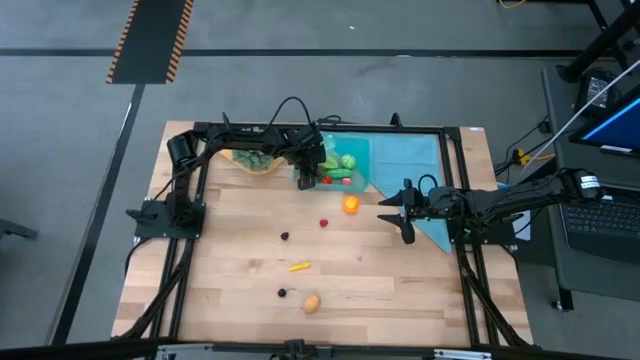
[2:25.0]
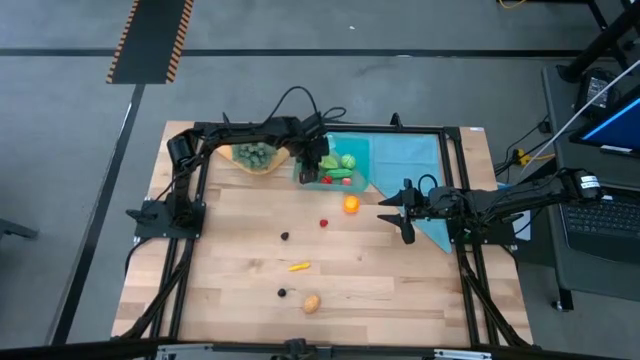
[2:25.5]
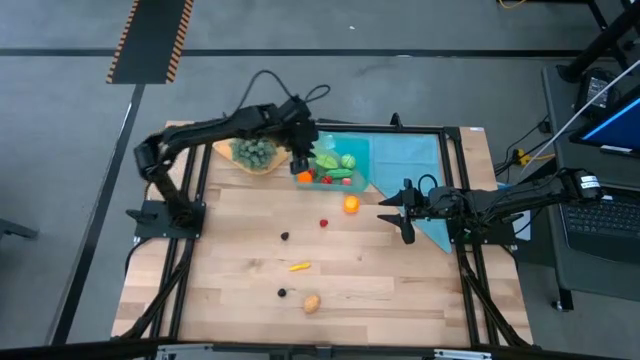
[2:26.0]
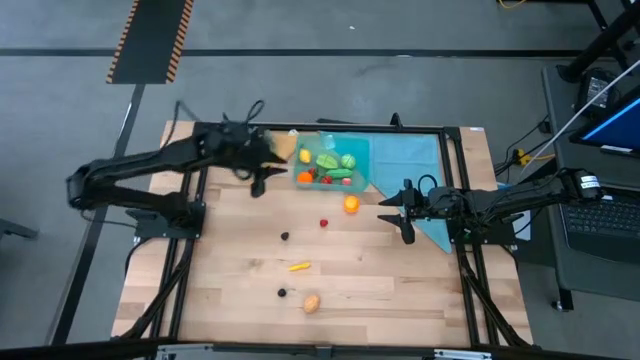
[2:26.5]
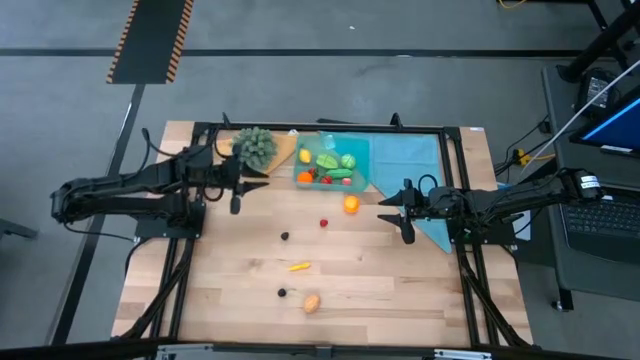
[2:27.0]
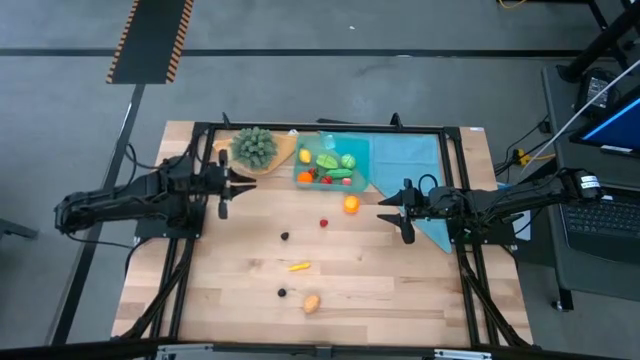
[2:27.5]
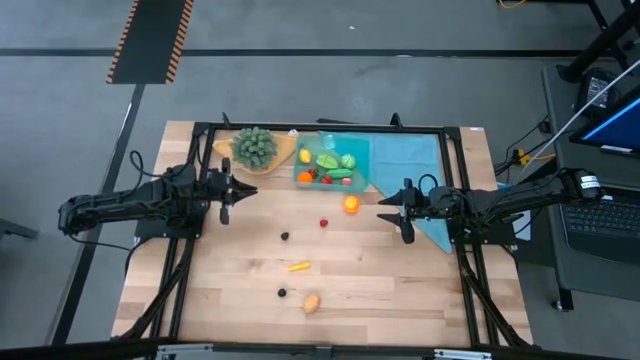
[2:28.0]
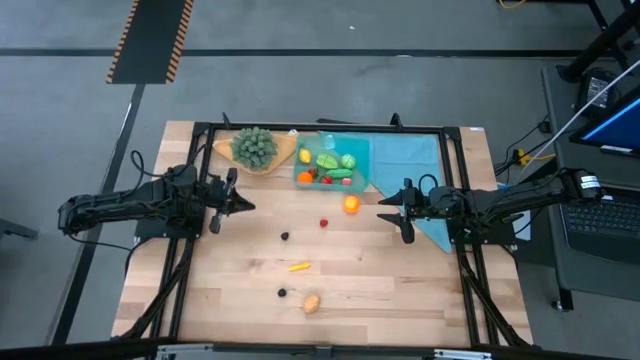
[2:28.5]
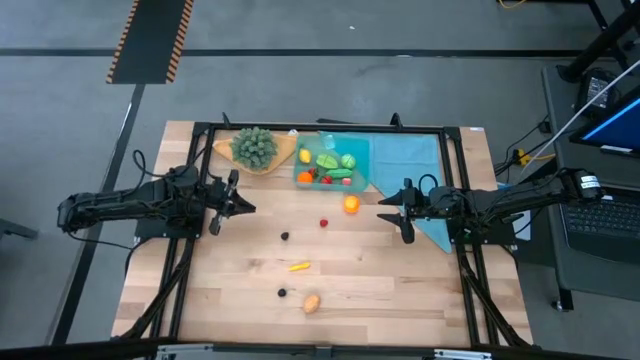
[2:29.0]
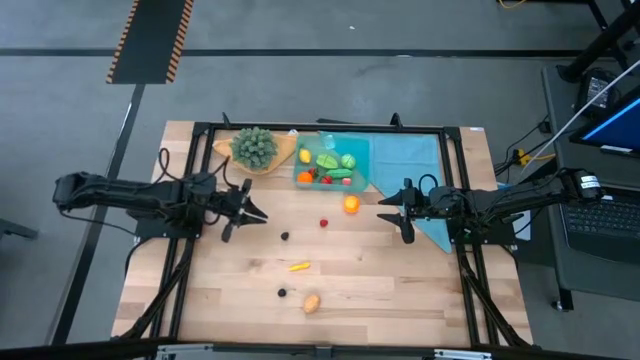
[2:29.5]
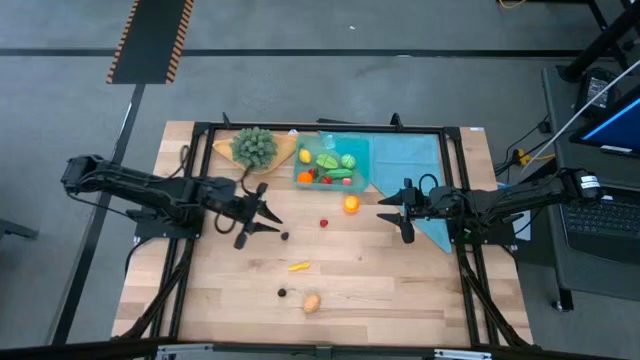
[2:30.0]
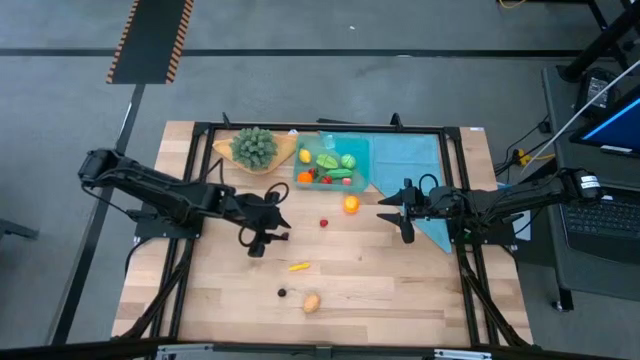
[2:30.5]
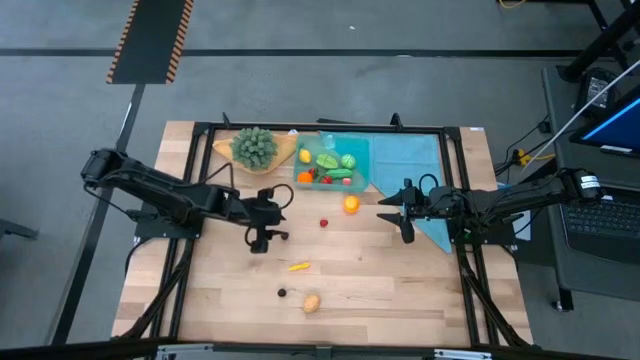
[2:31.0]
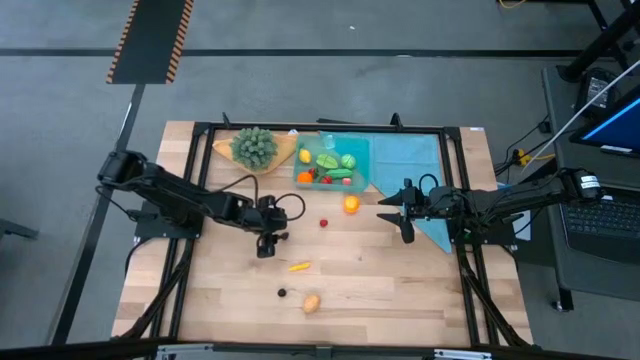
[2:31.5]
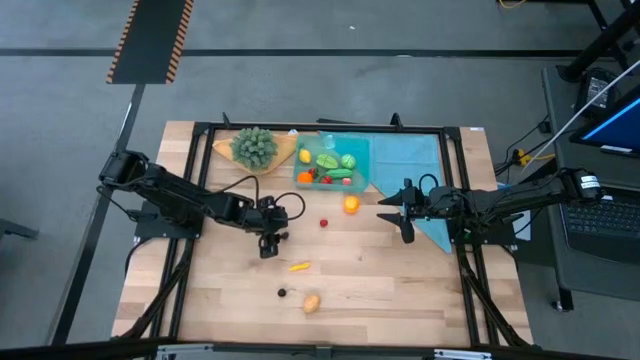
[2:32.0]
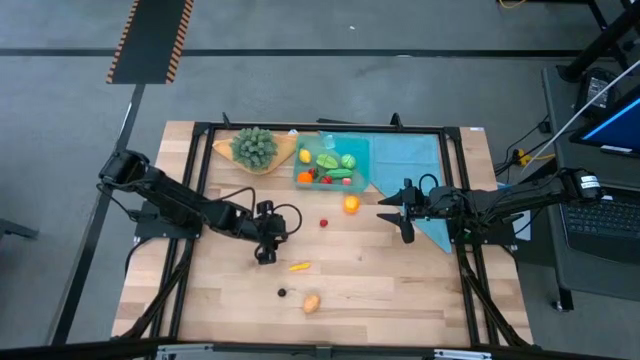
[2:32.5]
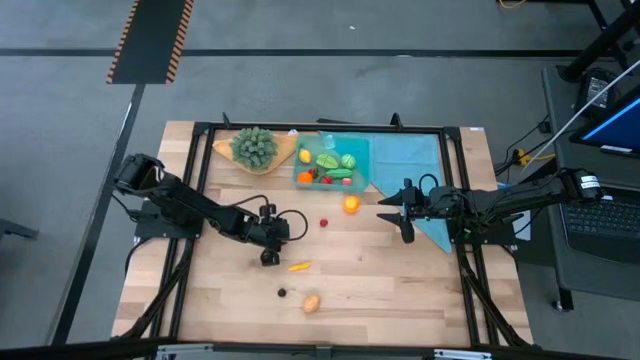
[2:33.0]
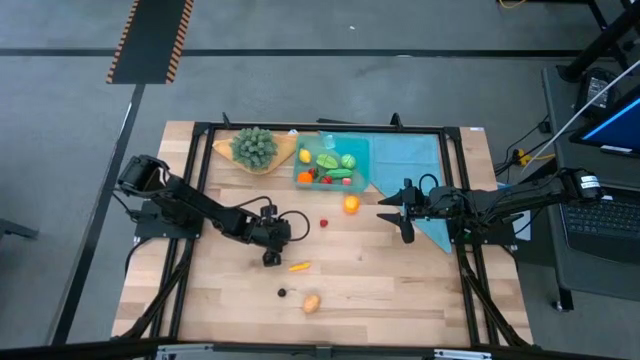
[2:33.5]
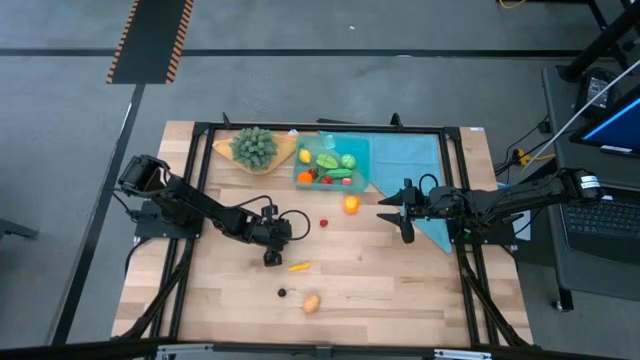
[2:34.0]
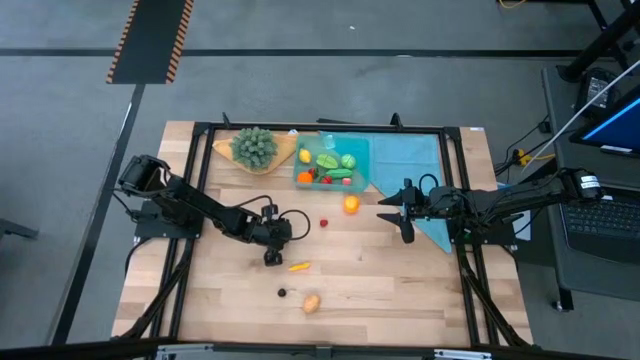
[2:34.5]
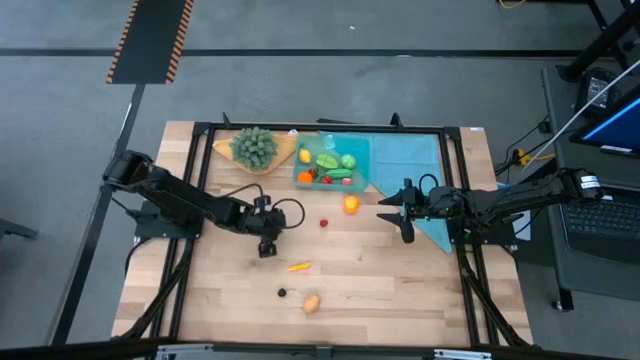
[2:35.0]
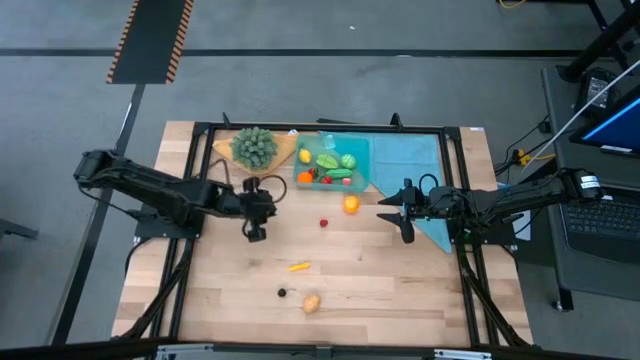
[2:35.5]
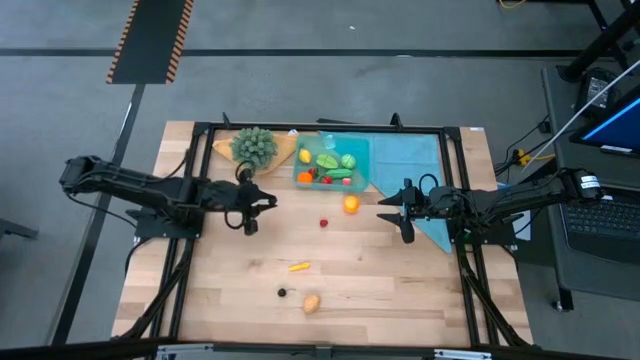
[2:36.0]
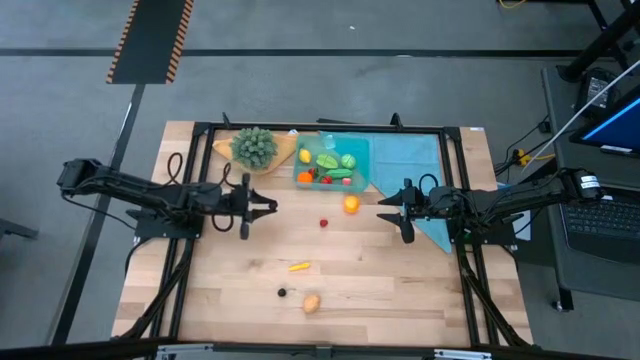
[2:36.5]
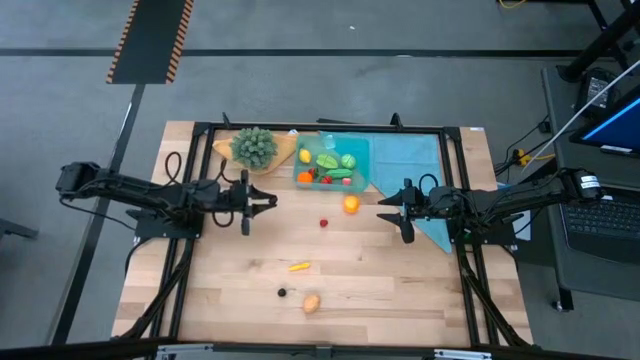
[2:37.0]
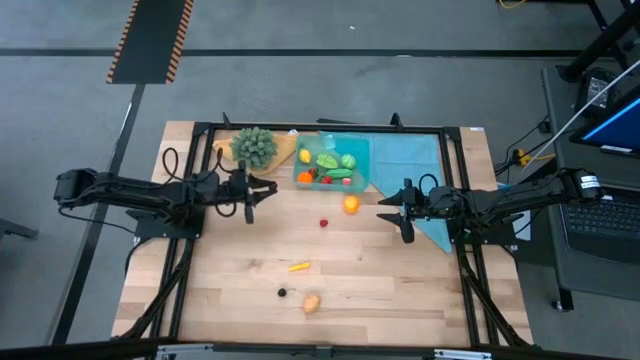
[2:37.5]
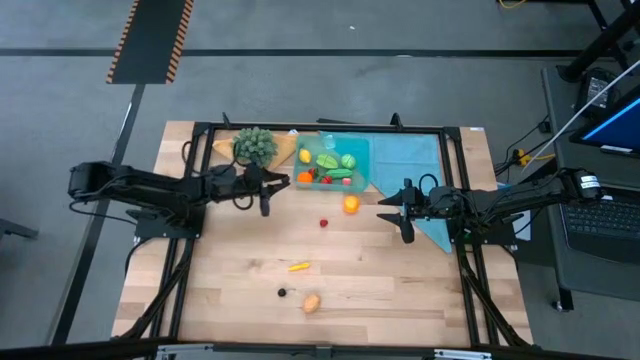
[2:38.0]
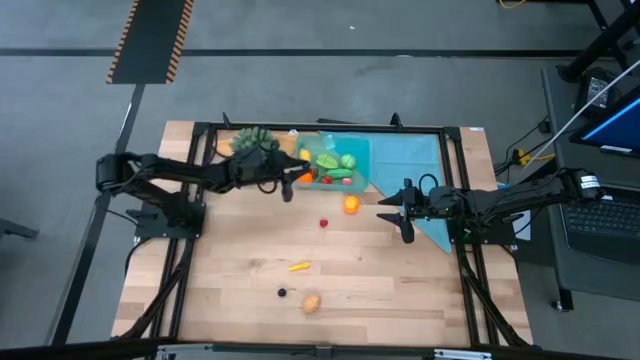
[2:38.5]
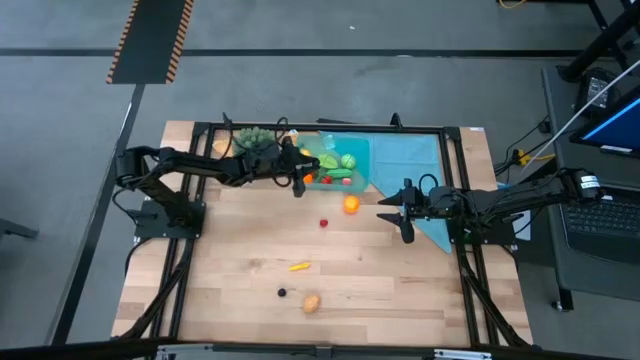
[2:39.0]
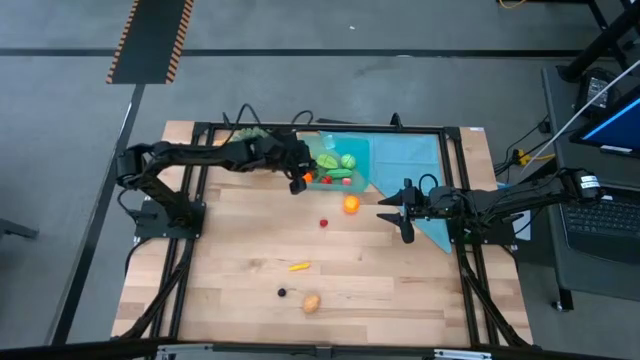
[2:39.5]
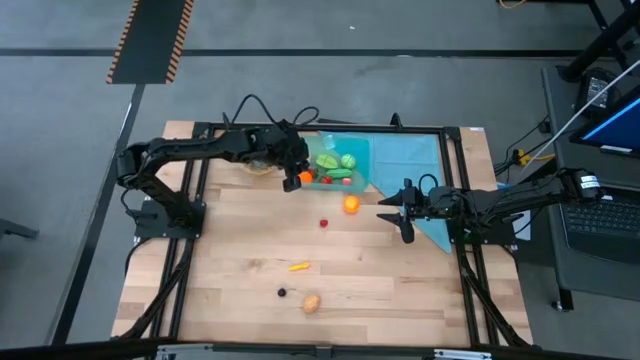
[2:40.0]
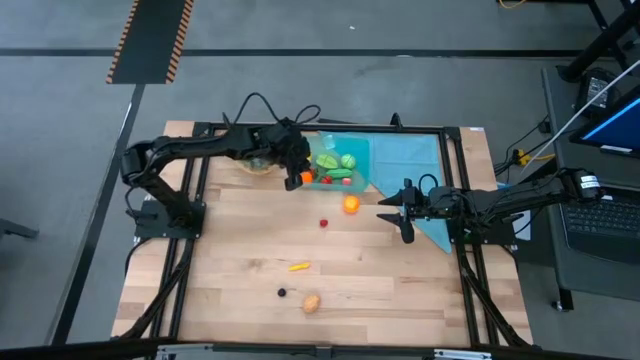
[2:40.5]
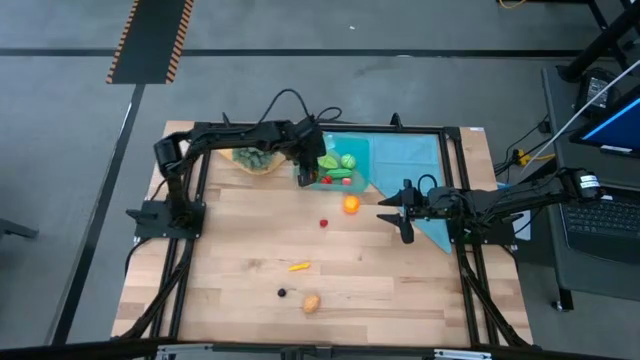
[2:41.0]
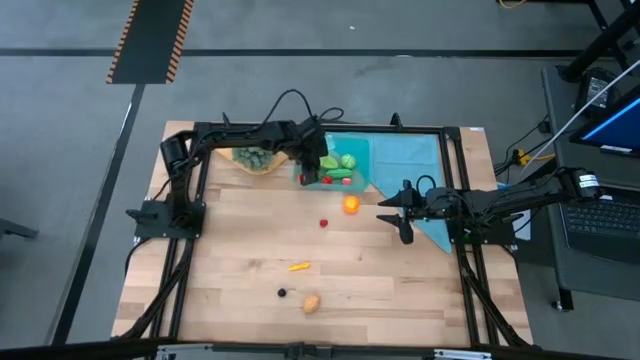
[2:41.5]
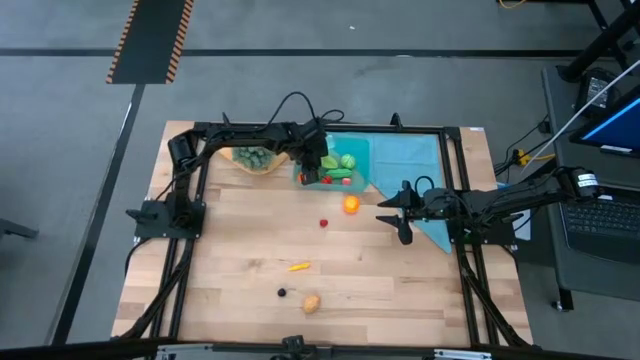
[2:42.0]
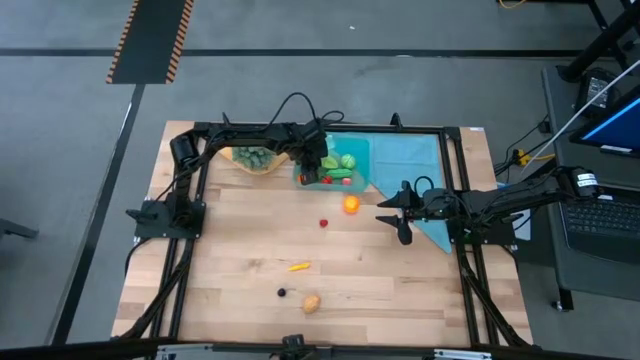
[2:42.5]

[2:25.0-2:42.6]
Task: Pick and placing Produce into tupperware
Put the blackberry into the blue bin
